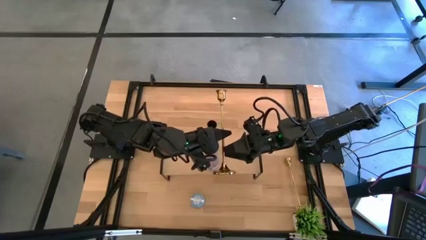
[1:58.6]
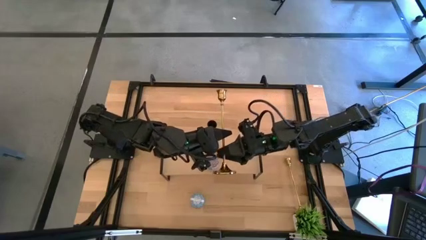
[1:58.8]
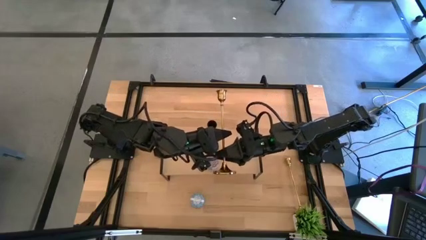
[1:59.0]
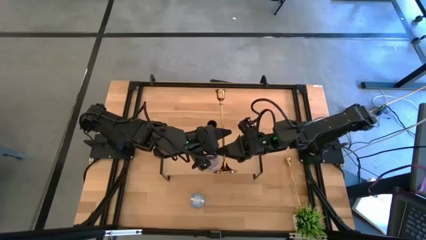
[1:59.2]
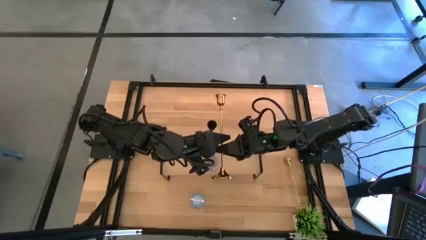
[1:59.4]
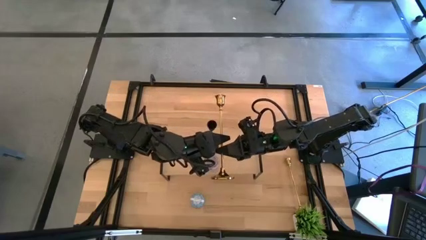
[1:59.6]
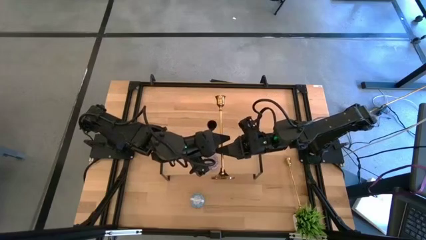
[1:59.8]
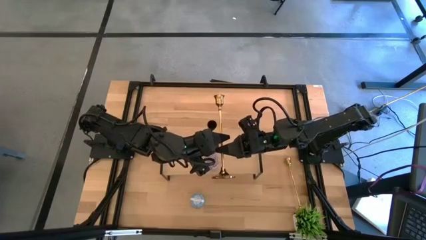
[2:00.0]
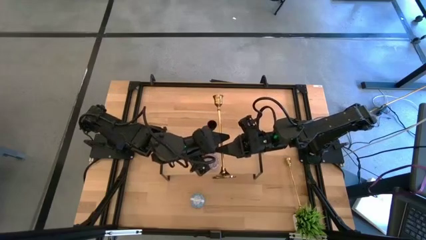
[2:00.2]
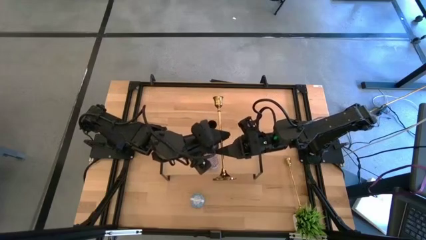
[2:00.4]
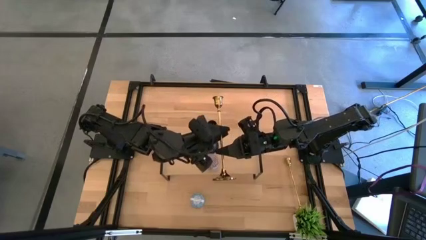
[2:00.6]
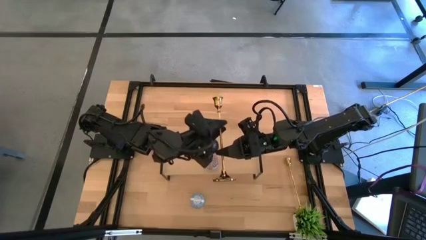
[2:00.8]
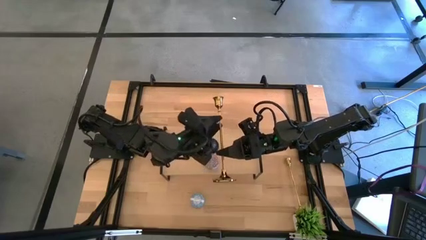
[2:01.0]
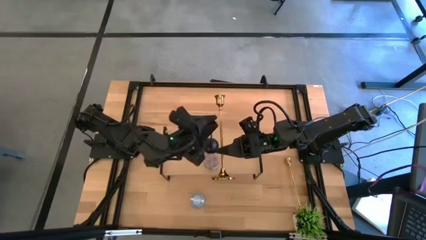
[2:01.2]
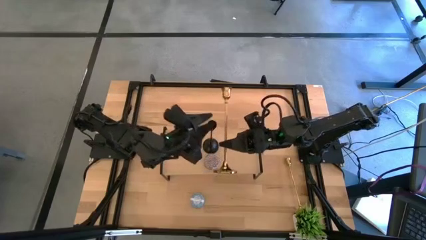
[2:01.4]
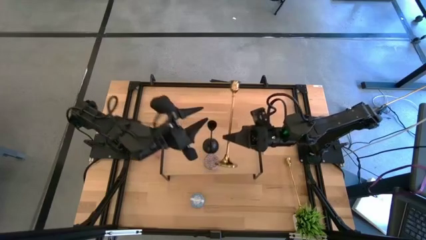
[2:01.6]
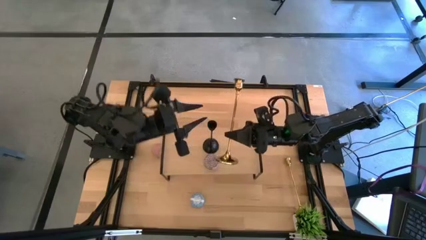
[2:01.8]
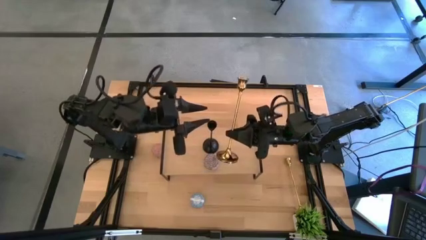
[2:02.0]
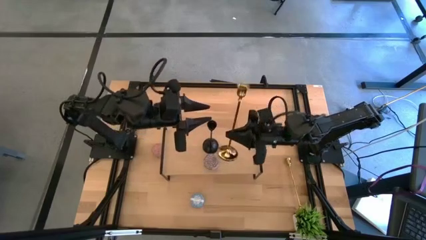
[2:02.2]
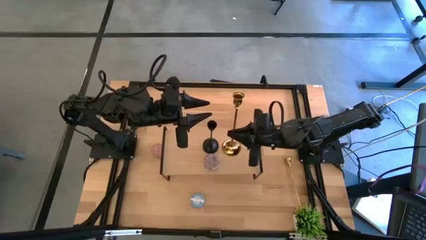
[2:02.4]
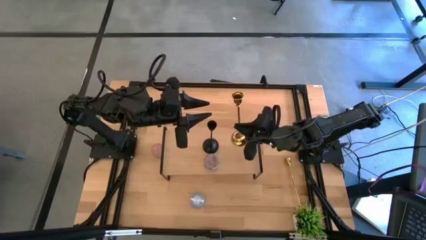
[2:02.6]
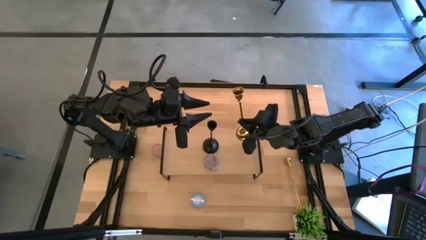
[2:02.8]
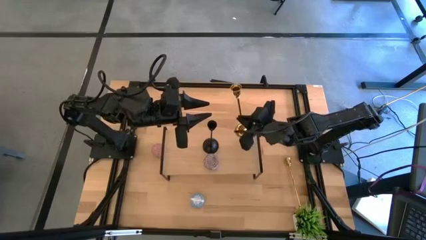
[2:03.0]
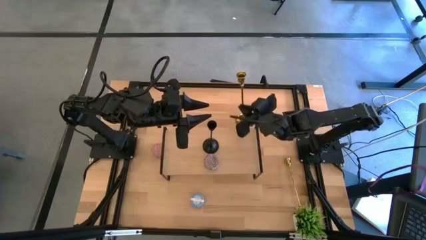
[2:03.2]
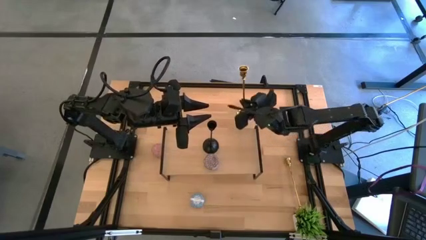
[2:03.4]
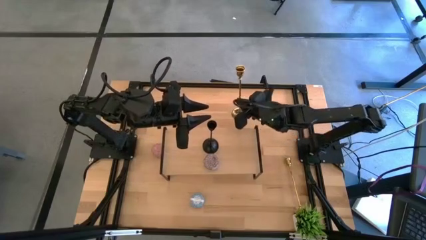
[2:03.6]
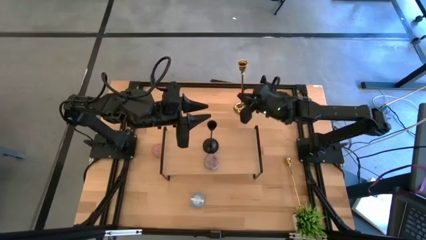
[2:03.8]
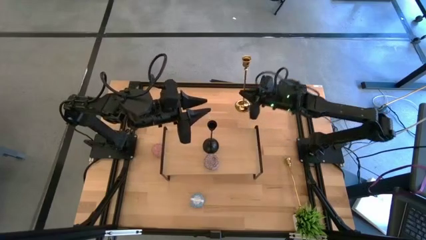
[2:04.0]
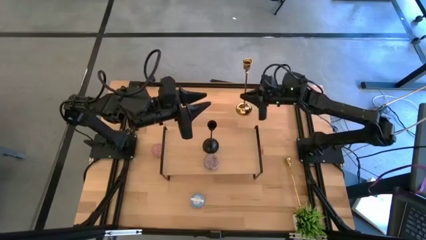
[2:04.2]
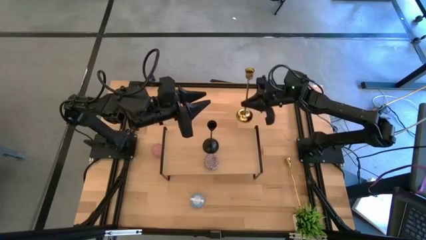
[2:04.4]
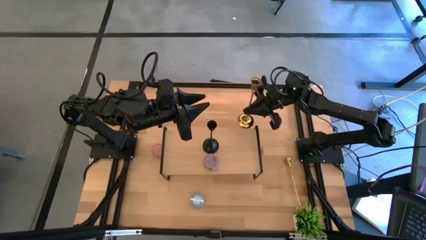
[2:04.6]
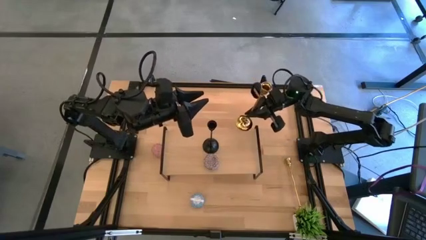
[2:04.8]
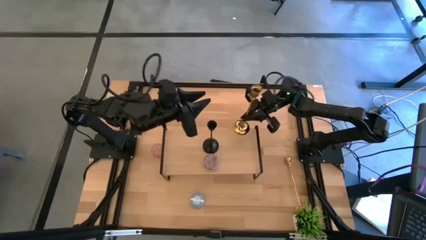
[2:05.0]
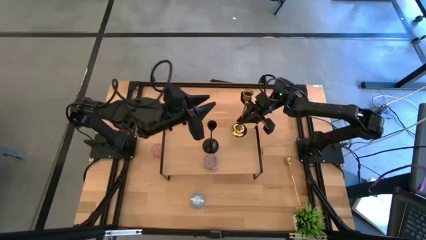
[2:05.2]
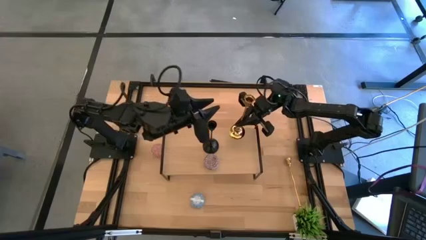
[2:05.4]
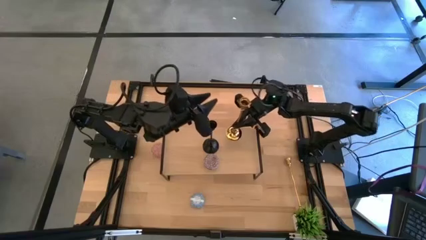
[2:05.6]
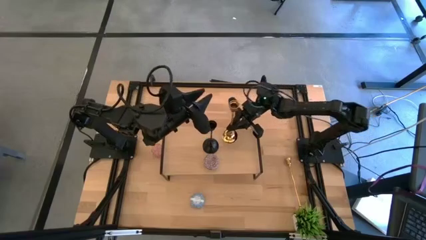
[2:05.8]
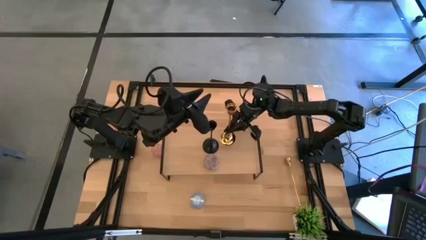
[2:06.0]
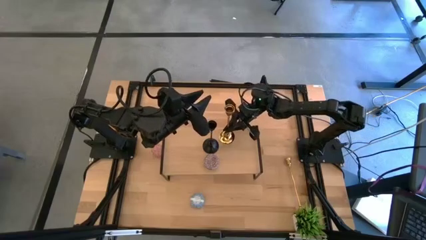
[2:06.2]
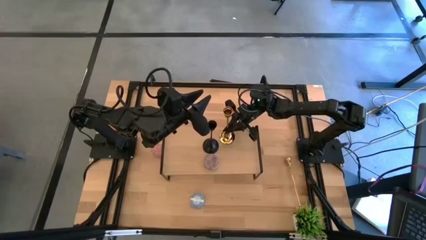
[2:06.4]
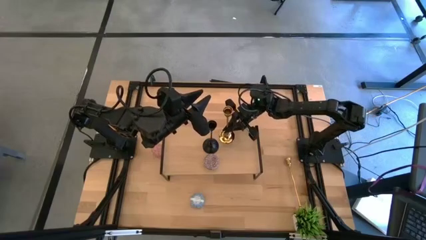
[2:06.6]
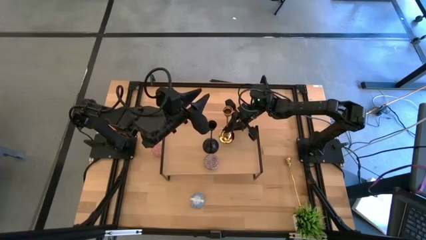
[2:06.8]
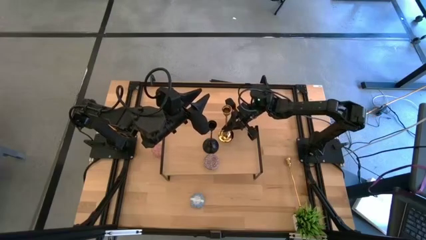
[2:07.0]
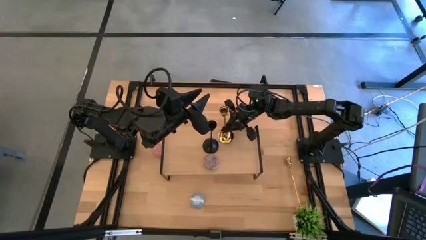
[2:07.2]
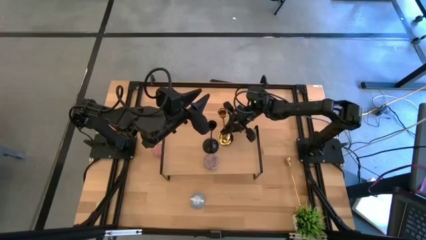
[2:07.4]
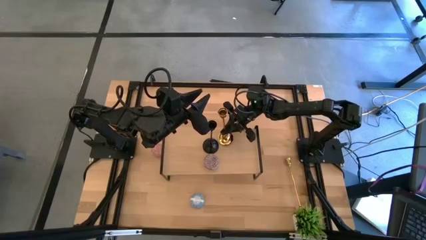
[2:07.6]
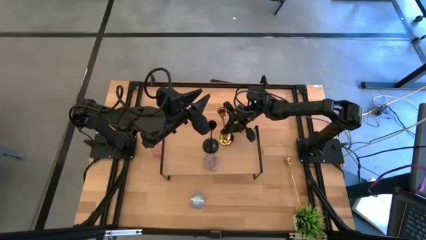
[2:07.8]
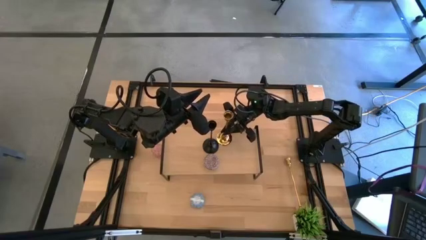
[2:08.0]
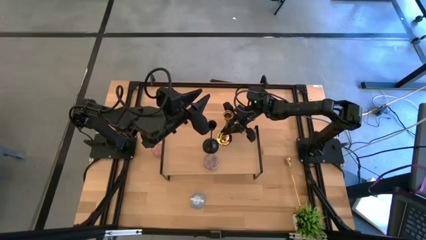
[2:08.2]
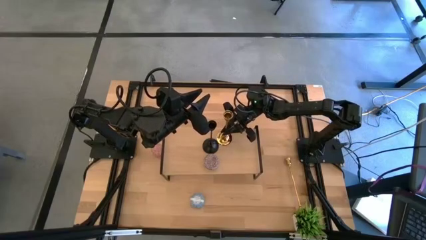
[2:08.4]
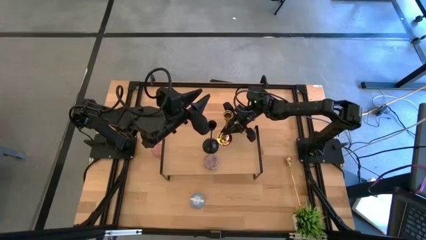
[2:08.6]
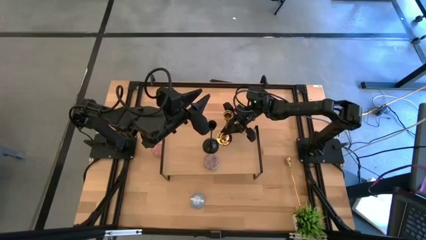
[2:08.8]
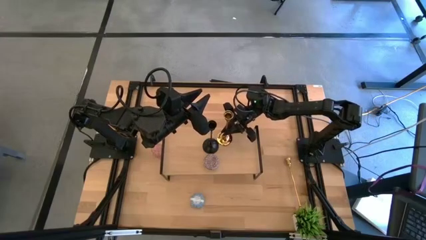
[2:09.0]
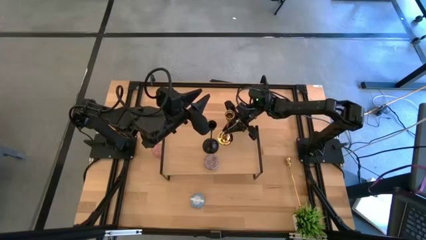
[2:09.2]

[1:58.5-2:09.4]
Task: Pick & Place candle stick holders
Put the gold candle holder on the shelf
